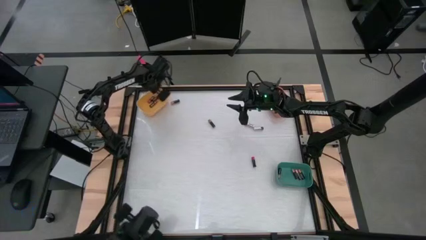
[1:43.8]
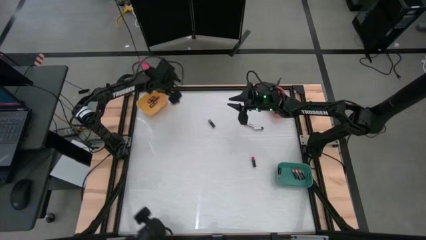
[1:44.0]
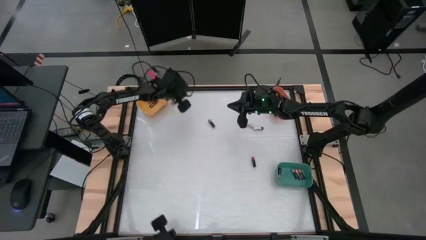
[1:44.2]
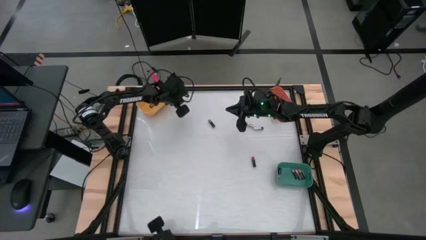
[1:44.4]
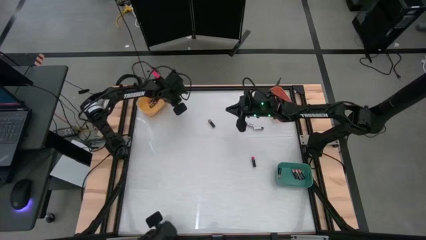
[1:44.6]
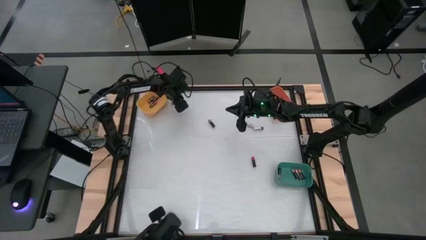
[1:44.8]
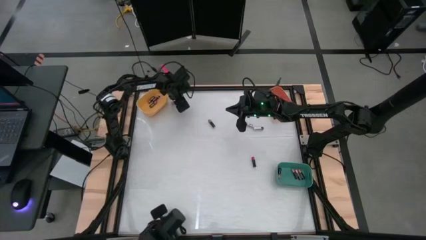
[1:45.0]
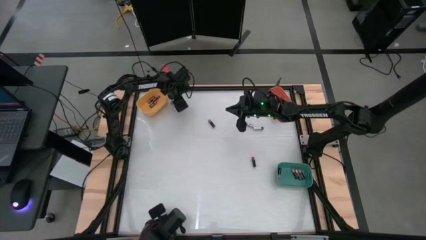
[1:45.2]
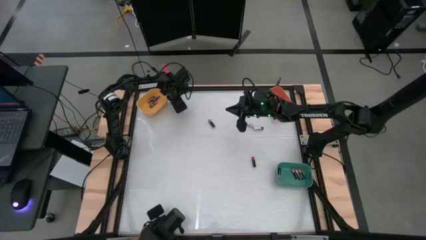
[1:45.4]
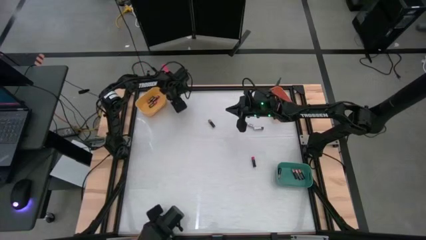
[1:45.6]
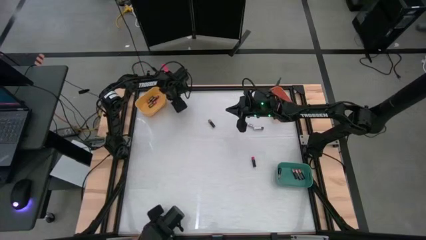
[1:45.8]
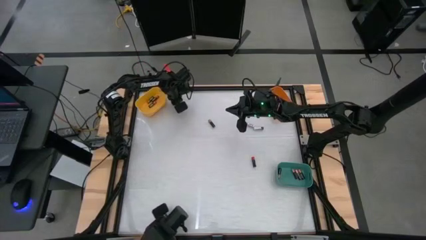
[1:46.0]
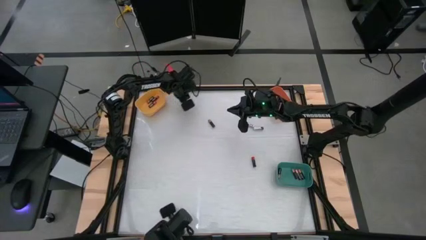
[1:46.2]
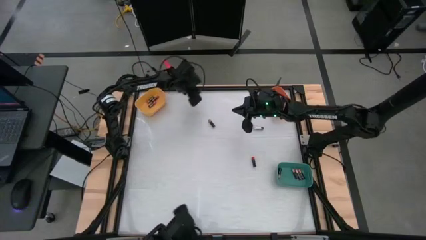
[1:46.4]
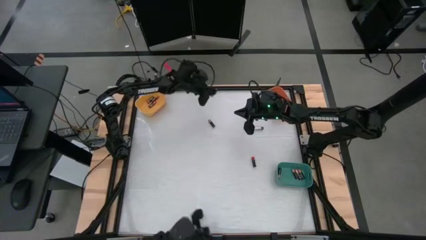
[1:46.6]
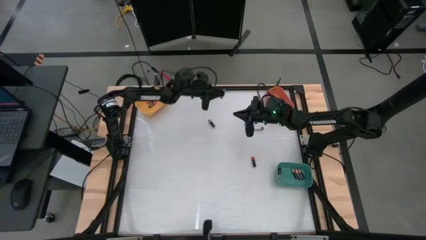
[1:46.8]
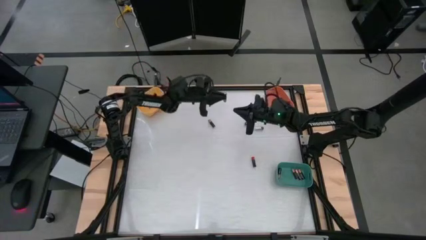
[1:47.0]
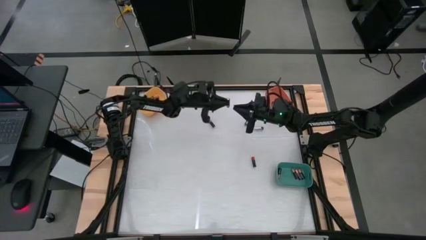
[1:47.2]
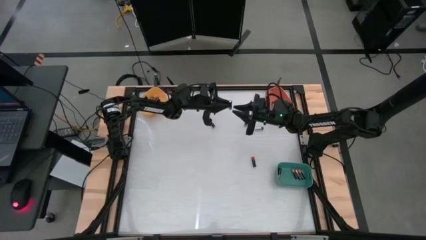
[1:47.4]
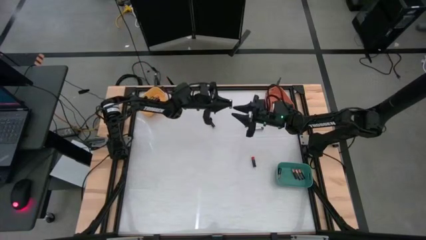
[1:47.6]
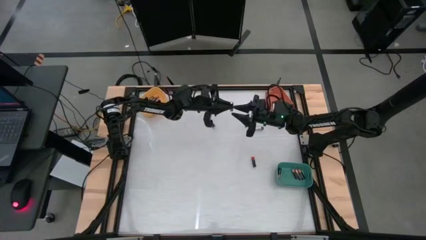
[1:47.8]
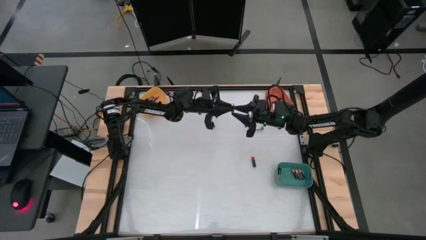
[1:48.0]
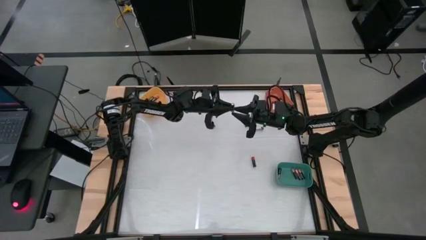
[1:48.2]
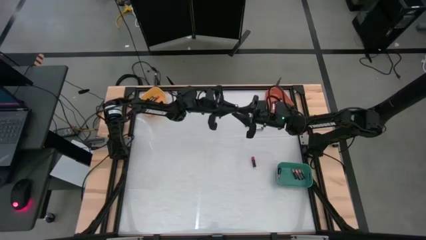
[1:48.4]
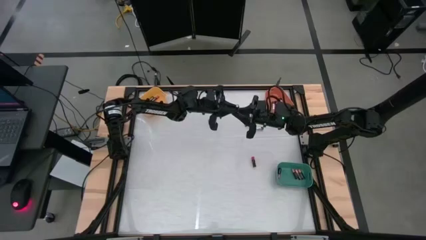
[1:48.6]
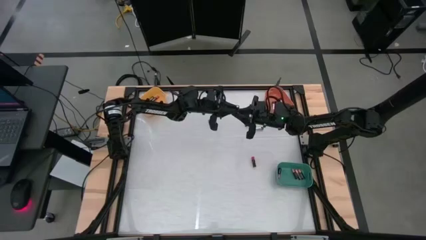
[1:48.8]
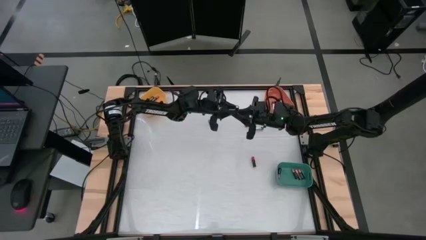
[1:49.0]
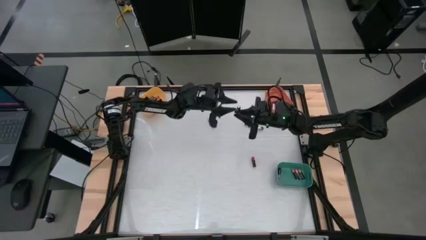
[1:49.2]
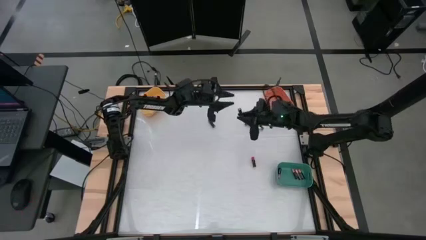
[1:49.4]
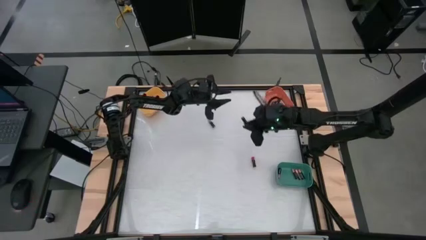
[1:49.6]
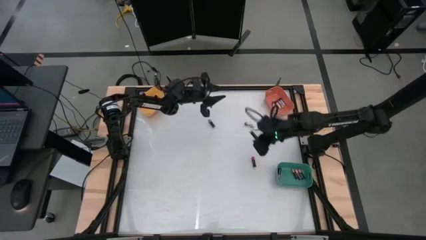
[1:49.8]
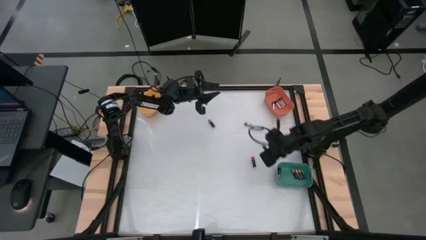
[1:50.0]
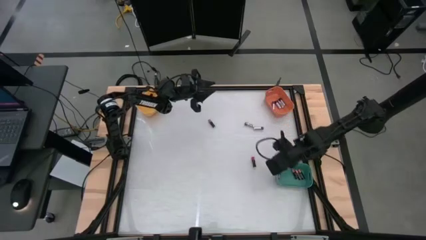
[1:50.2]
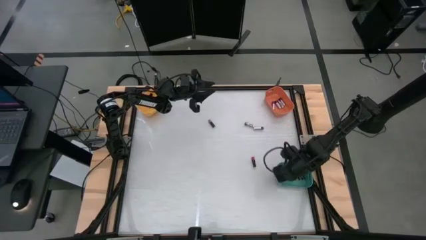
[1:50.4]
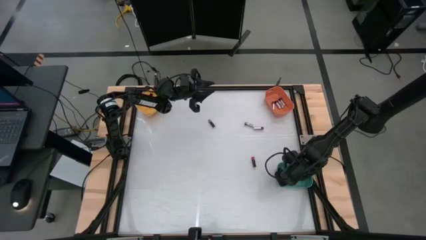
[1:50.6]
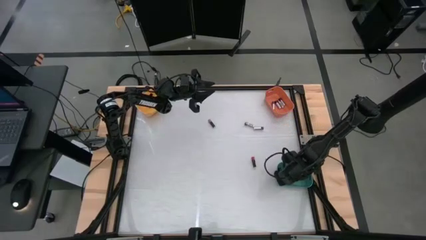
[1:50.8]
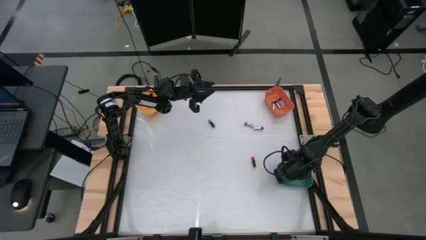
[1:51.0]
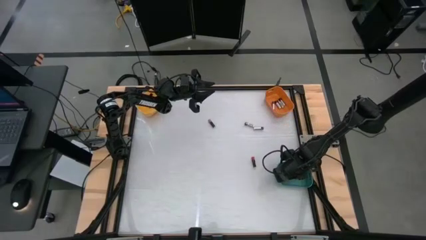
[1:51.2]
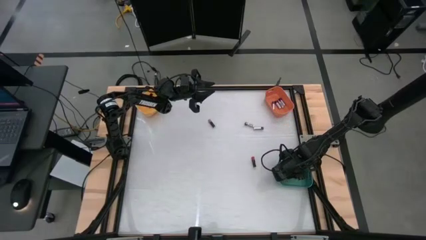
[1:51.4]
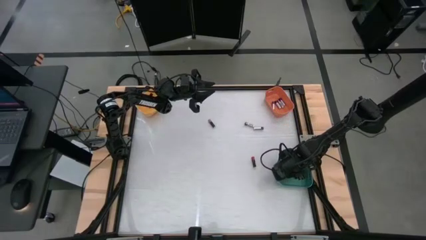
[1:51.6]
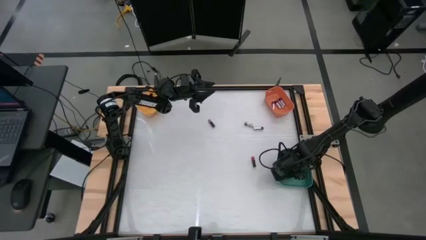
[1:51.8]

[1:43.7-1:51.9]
Task: Sort batteries
Put the brown battery into the green bin

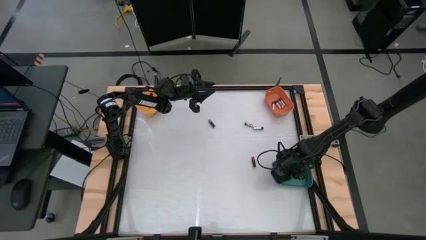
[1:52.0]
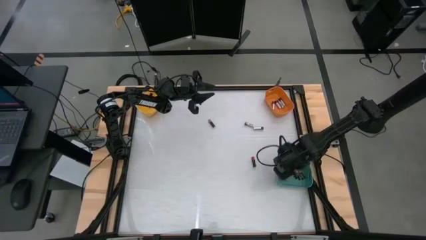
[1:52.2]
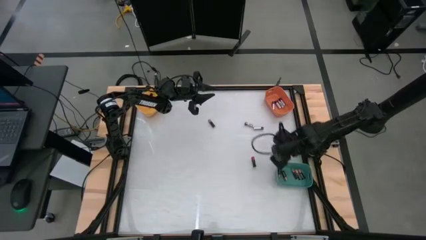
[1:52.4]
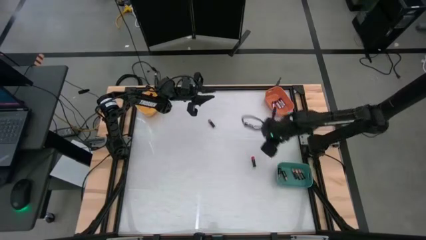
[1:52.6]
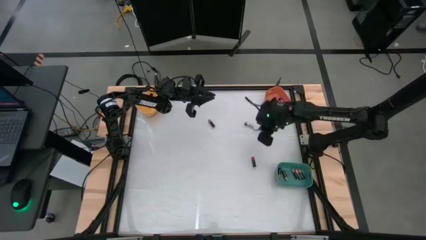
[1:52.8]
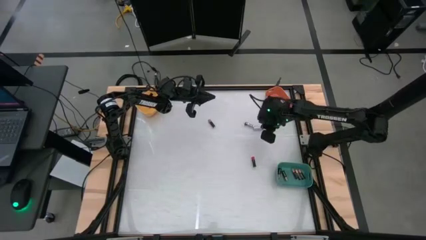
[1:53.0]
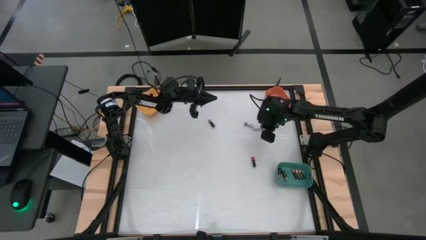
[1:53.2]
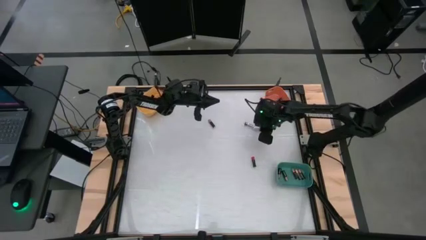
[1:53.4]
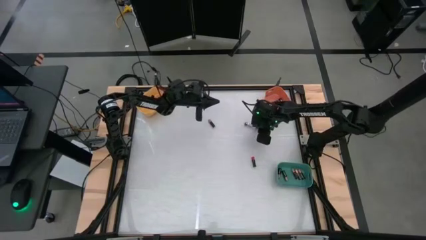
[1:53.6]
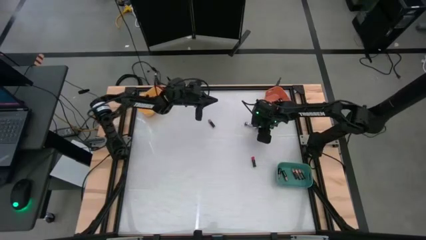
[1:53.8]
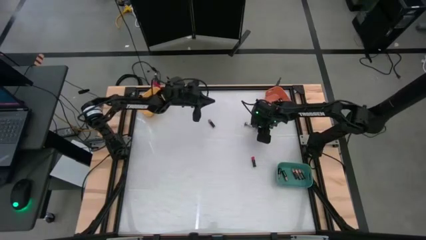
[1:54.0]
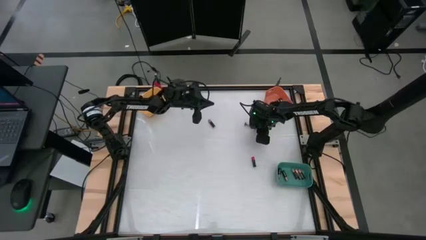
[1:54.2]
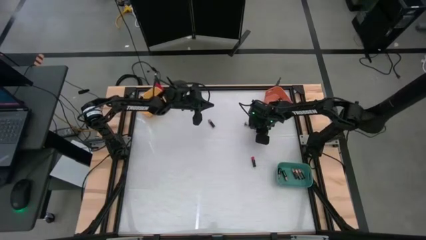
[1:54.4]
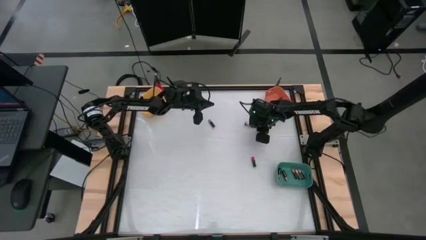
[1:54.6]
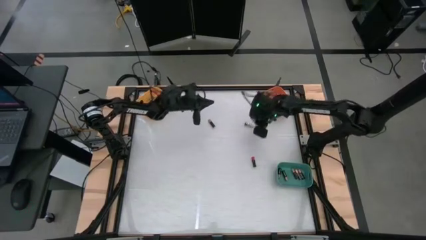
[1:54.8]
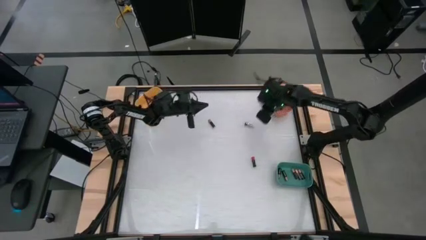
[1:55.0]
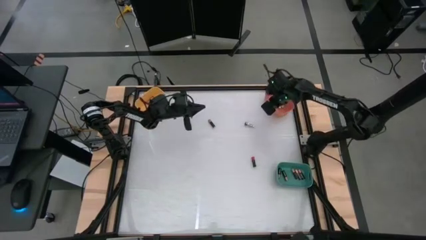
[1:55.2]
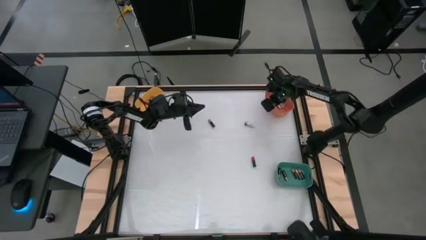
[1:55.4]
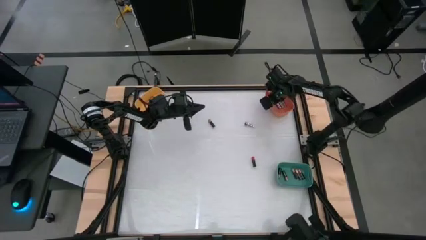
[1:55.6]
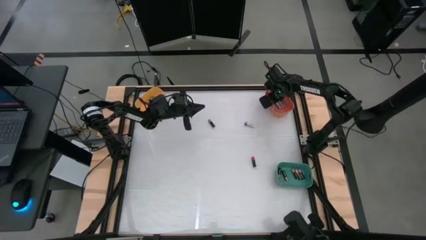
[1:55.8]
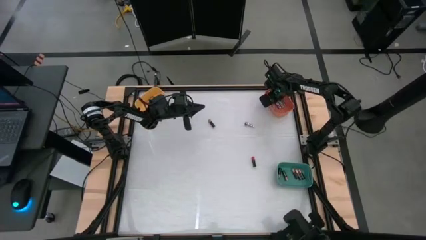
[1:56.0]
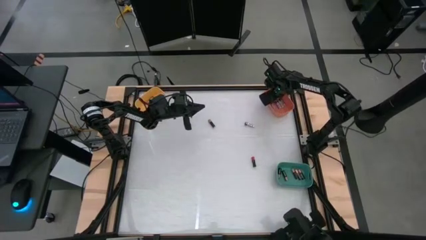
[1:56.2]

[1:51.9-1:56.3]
Put the silver battery into the orange bin

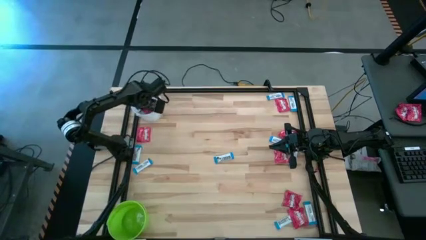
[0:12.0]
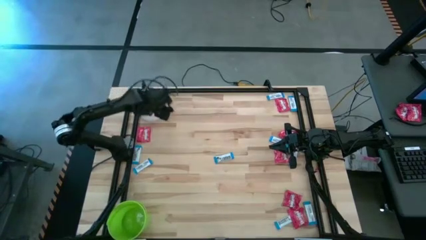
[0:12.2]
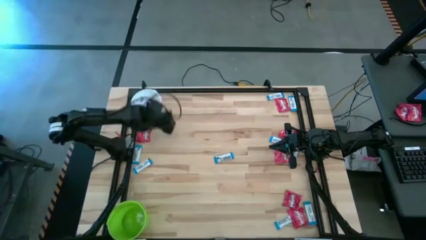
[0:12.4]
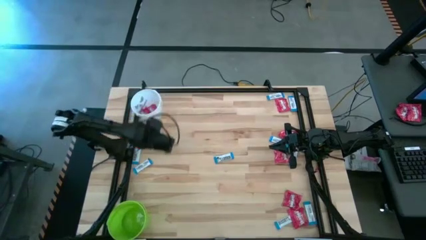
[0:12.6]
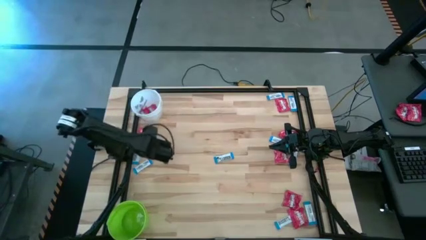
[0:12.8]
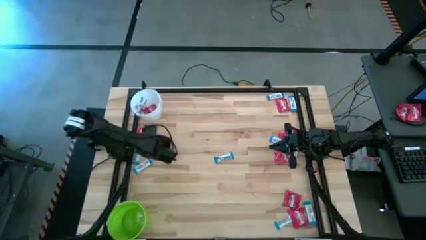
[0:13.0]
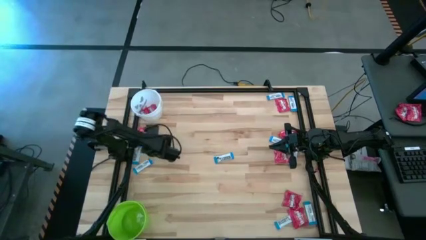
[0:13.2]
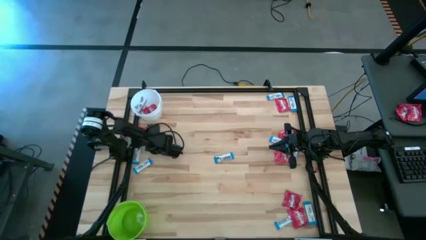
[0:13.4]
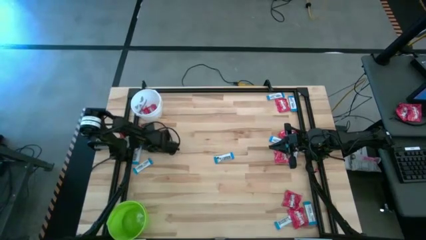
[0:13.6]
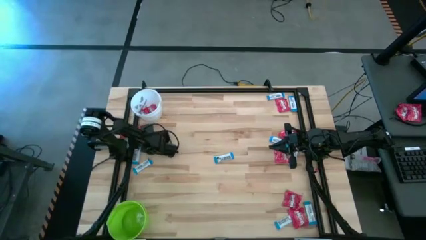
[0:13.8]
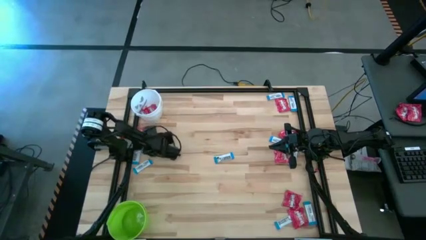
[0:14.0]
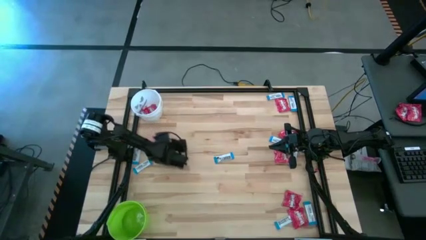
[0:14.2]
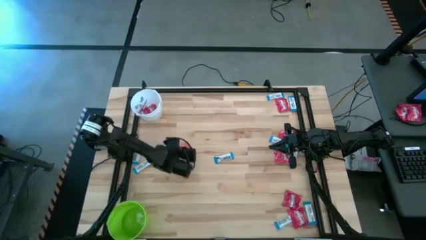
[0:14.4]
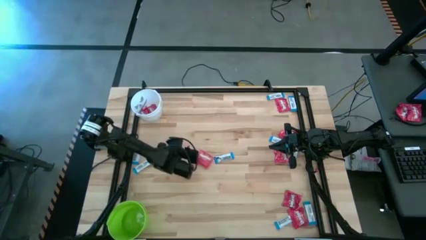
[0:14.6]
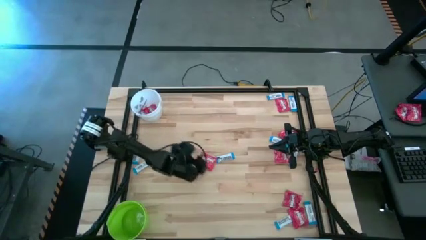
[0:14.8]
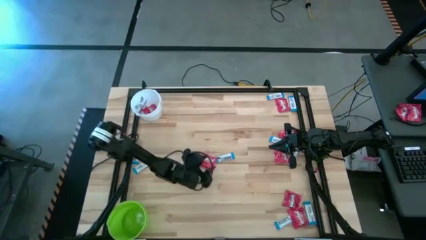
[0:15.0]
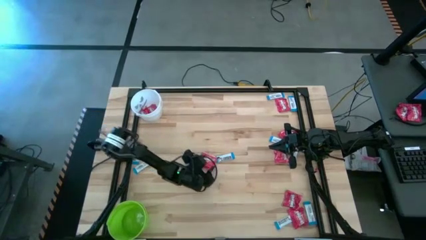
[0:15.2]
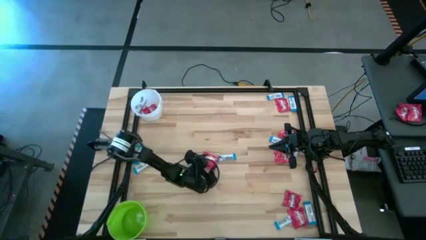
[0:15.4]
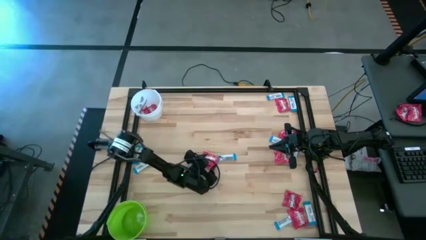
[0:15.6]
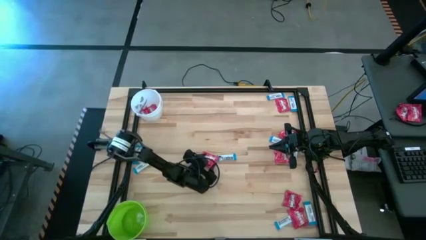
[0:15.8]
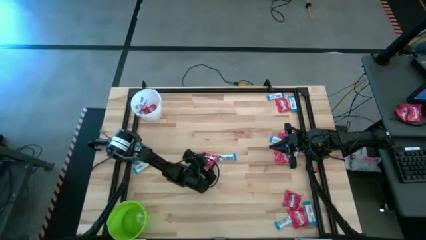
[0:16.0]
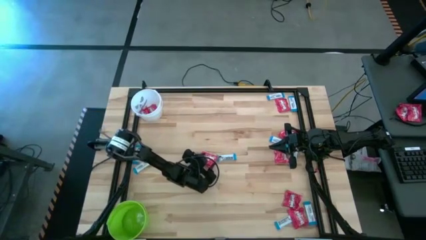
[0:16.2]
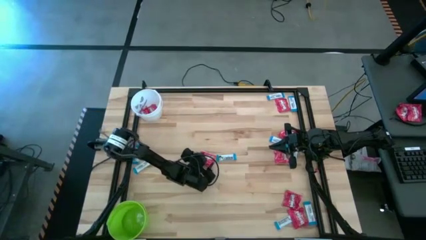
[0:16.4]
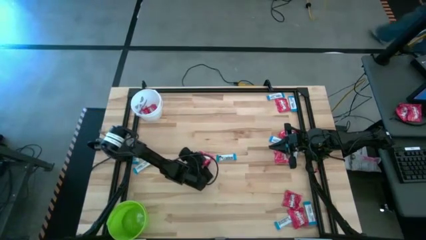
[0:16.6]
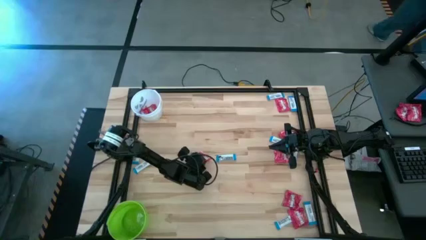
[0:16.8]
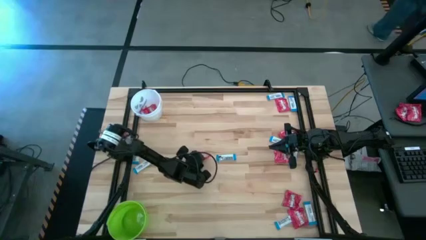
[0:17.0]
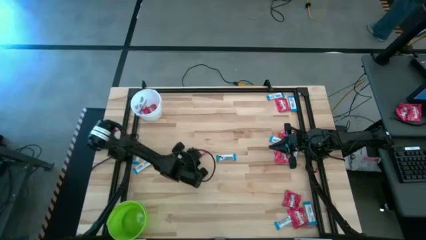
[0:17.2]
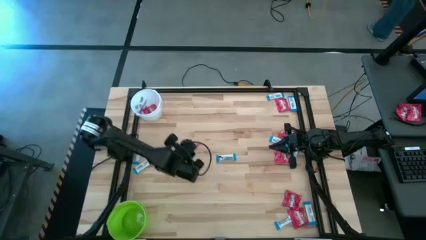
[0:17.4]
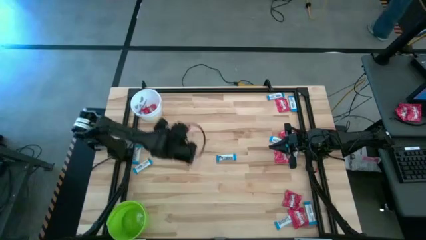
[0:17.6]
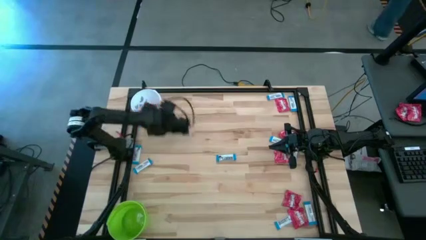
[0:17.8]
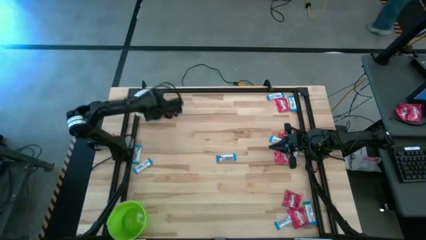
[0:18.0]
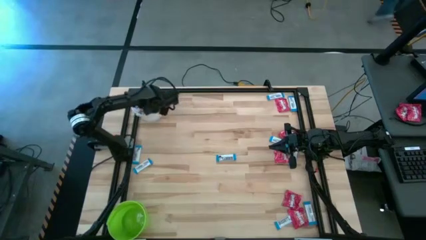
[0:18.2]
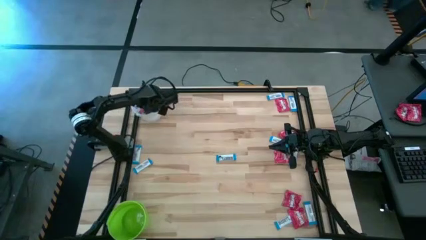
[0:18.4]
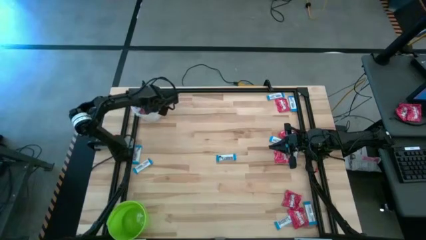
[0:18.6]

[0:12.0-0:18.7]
Task: Sort candy by brand, put in halloween buckets
Put the red candy into the white bucket
